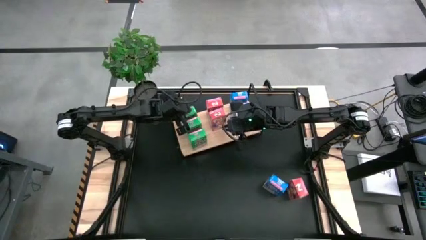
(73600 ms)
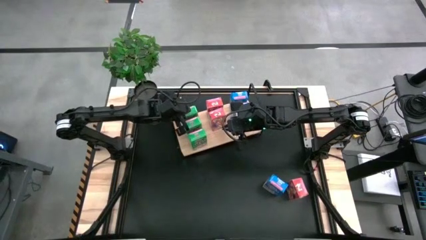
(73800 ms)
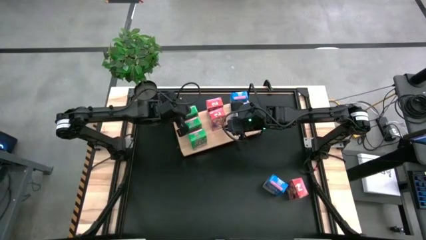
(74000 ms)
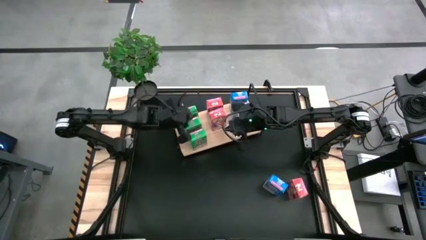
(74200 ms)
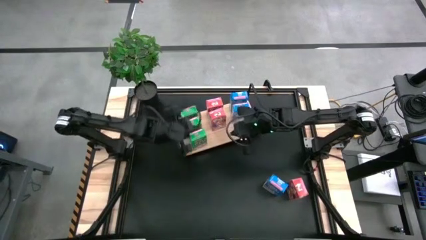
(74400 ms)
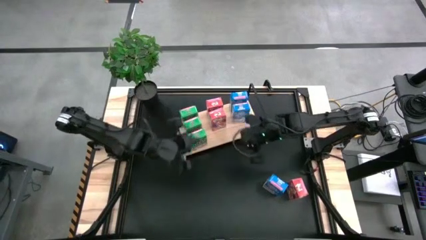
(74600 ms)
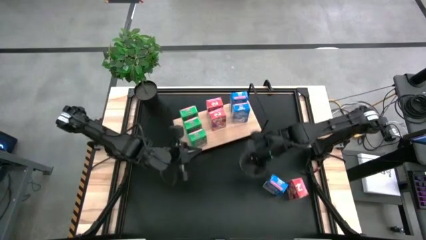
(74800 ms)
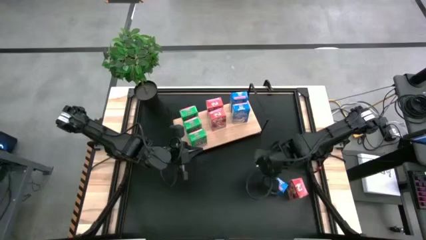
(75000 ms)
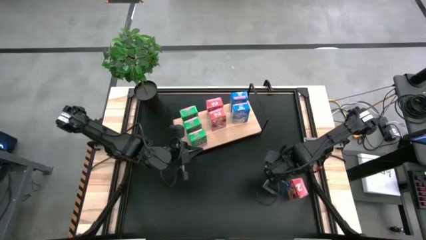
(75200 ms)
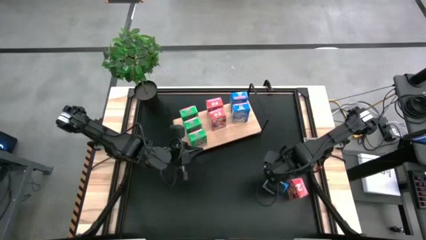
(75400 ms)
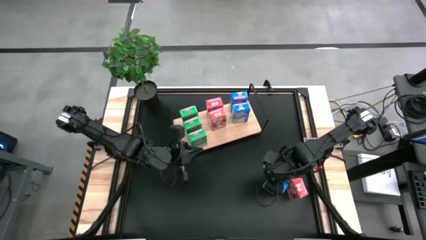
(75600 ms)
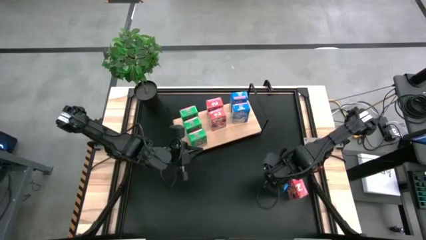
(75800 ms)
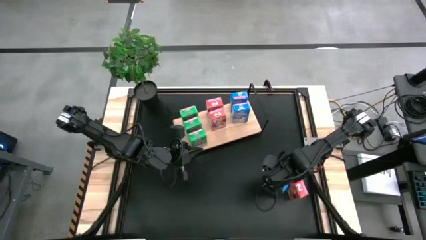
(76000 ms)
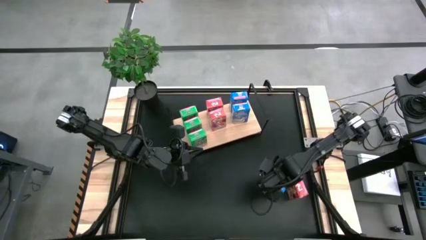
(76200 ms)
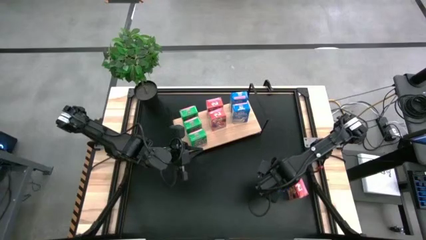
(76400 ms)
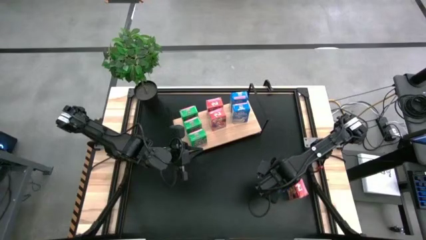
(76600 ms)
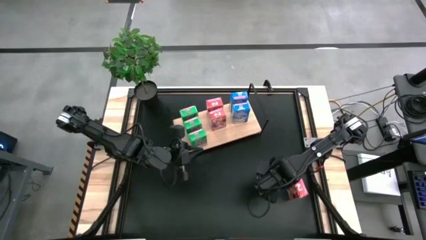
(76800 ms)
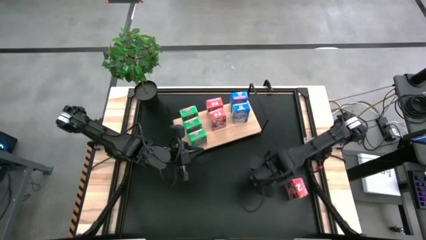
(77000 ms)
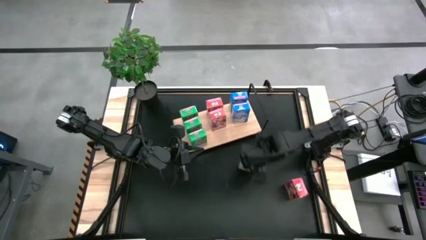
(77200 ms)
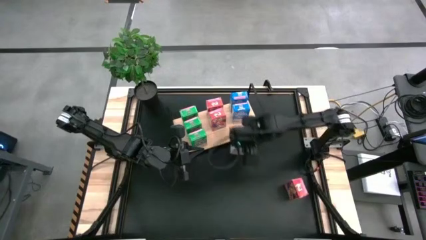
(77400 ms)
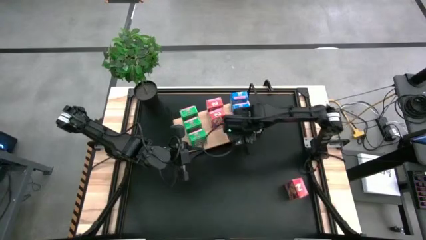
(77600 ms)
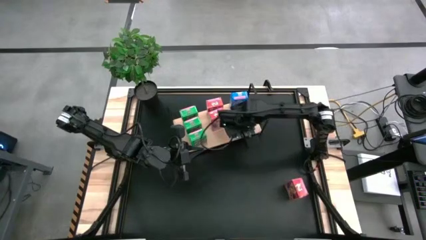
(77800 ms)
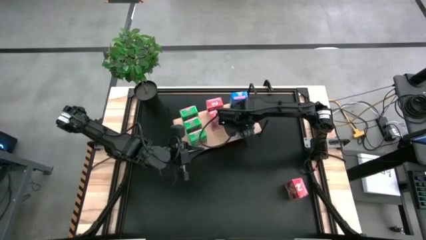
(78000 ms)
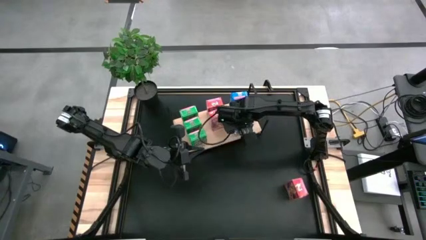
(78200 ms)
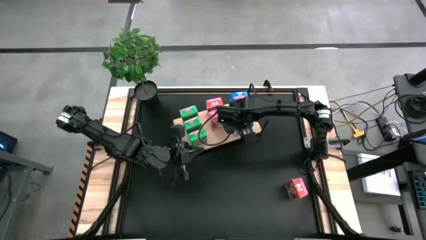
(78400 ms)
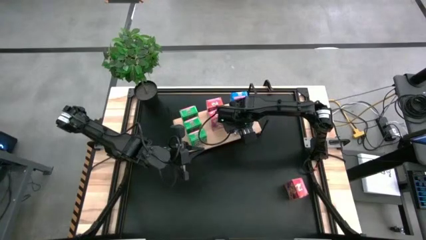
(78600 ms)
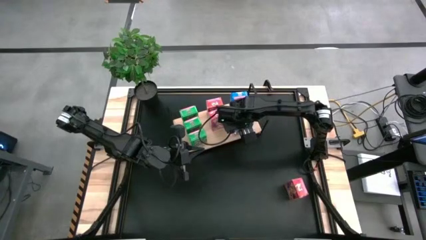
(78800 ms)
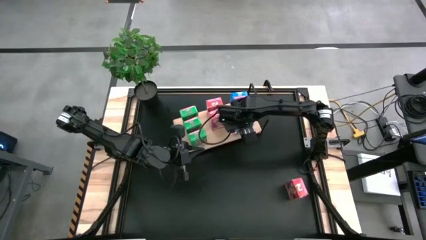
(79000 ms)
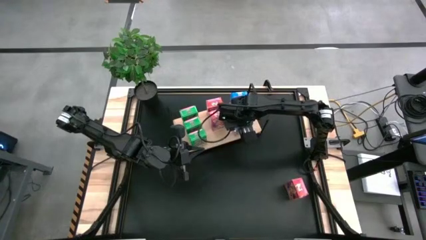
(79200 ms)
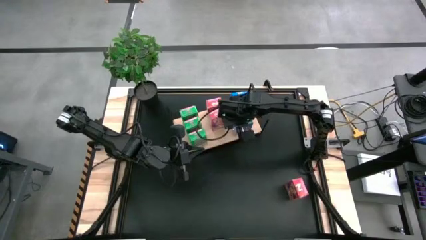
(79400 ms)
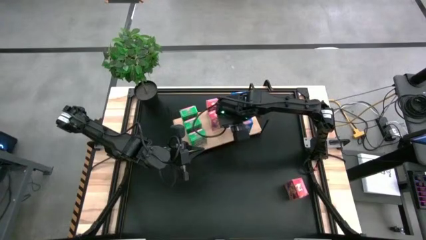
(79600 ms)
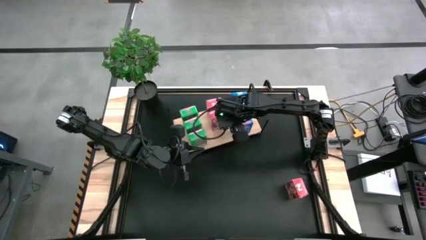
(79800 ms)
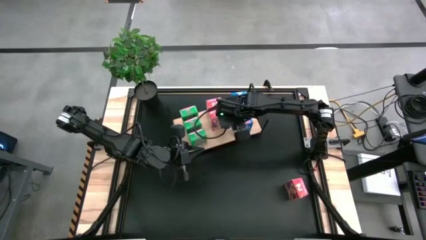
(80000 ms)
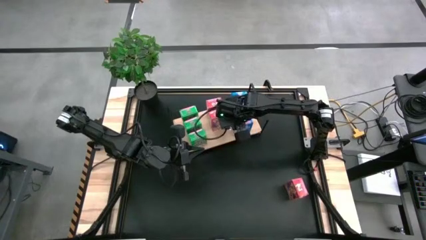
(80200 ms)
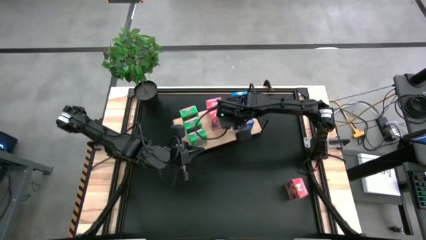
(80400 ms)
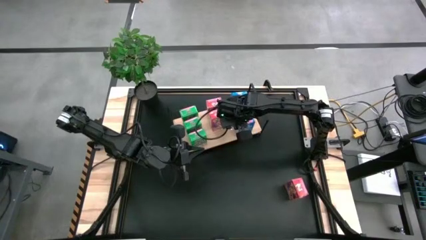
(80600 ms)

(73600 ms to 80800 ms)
Task: Stack cereal on shelf
Align the blue cereal box with the other blue cereal box on the shelf

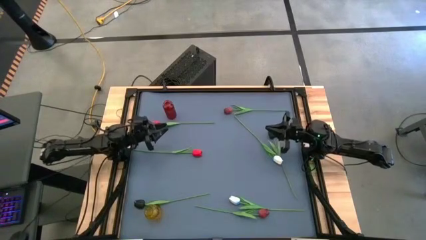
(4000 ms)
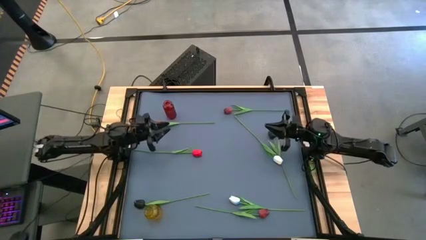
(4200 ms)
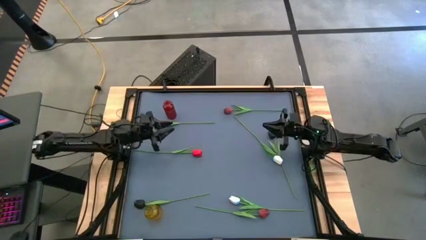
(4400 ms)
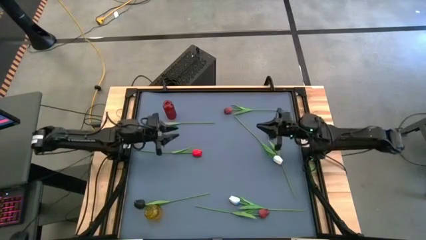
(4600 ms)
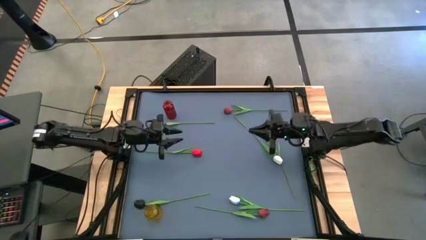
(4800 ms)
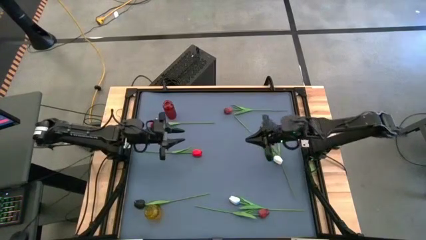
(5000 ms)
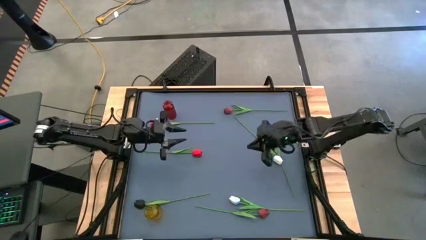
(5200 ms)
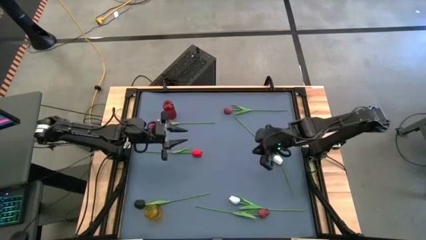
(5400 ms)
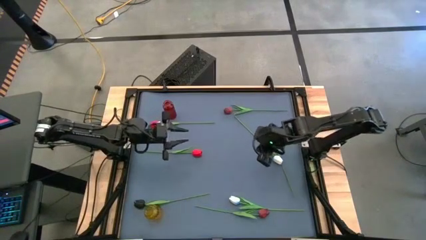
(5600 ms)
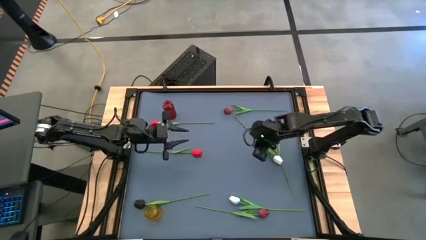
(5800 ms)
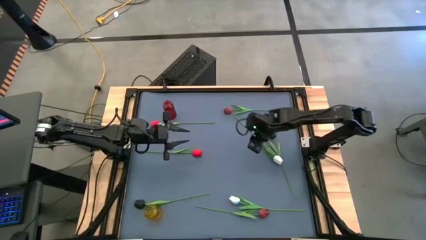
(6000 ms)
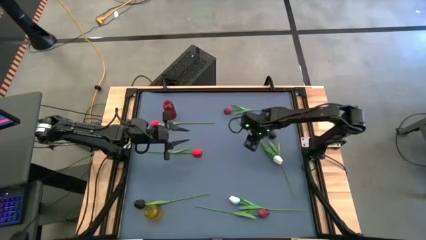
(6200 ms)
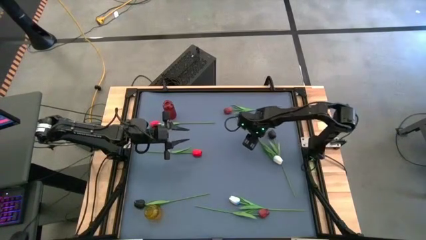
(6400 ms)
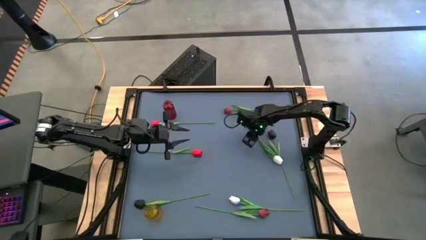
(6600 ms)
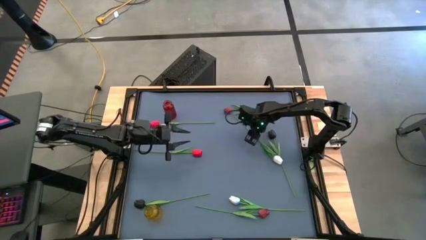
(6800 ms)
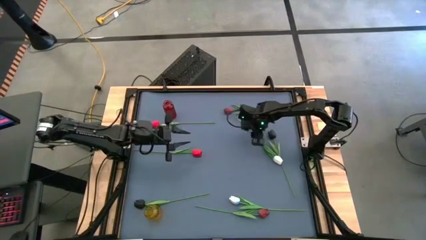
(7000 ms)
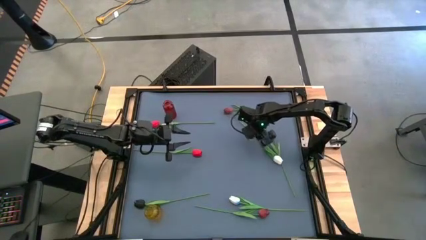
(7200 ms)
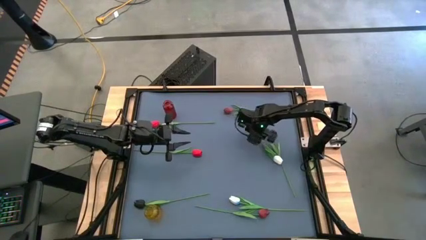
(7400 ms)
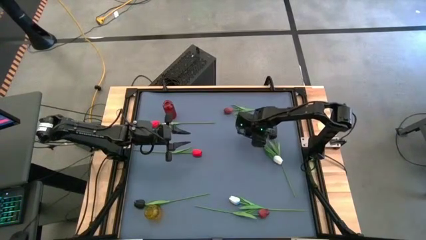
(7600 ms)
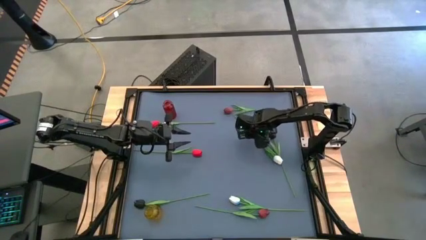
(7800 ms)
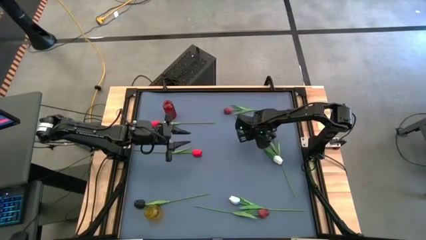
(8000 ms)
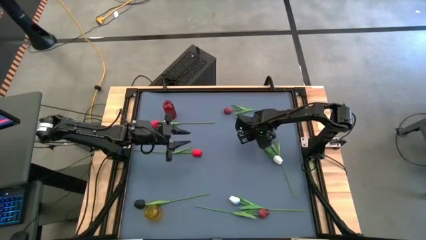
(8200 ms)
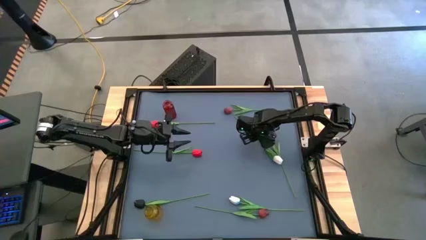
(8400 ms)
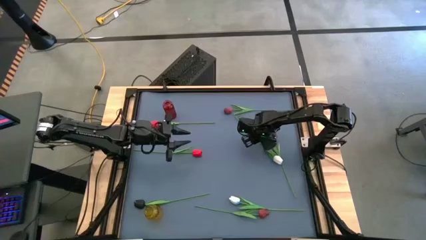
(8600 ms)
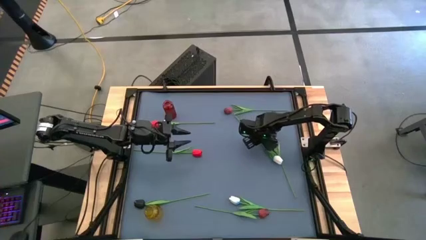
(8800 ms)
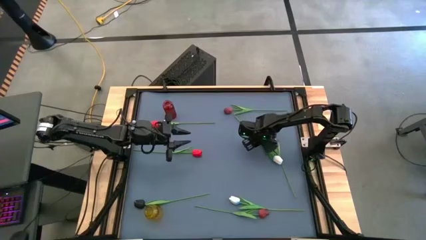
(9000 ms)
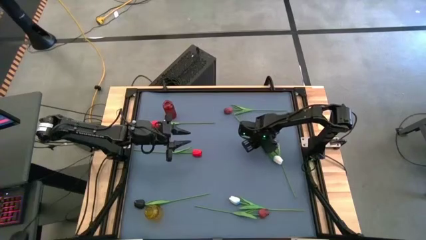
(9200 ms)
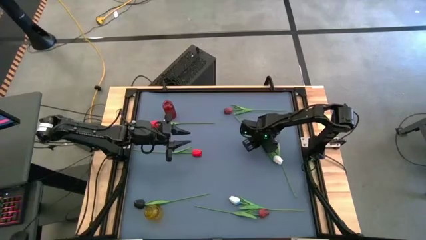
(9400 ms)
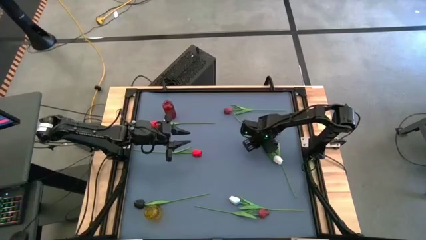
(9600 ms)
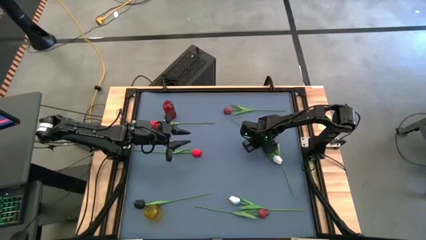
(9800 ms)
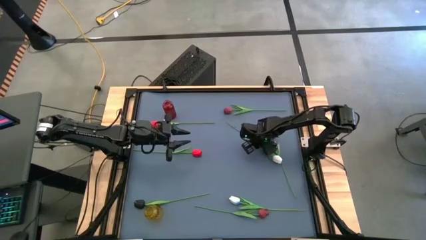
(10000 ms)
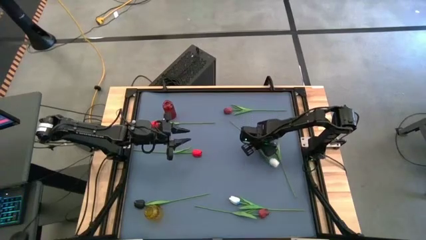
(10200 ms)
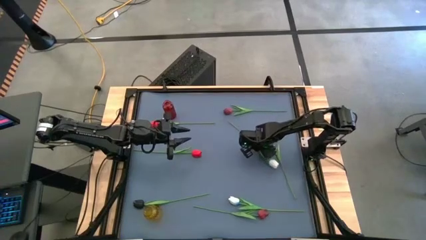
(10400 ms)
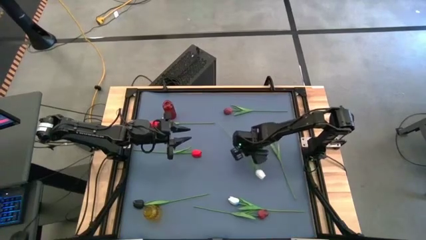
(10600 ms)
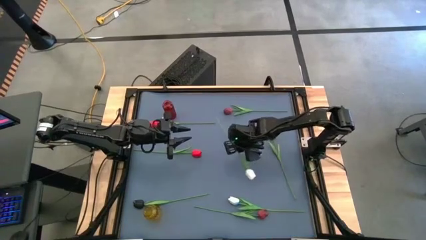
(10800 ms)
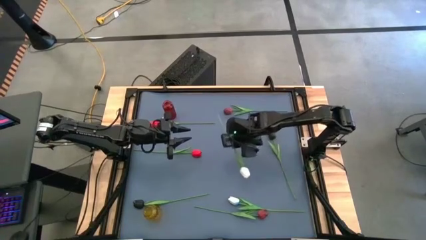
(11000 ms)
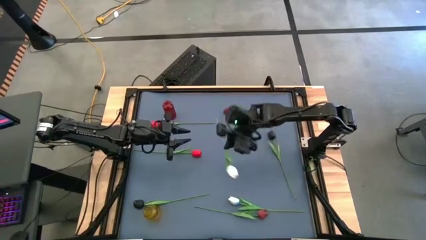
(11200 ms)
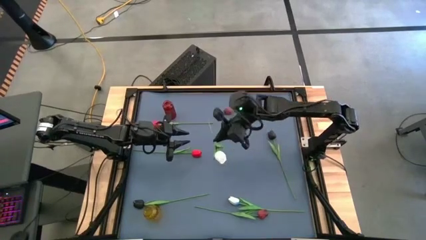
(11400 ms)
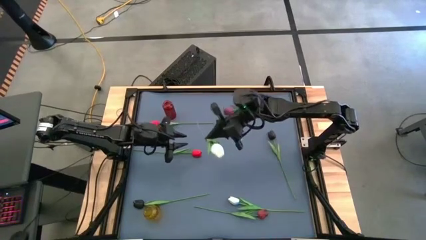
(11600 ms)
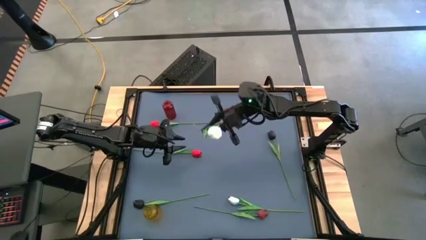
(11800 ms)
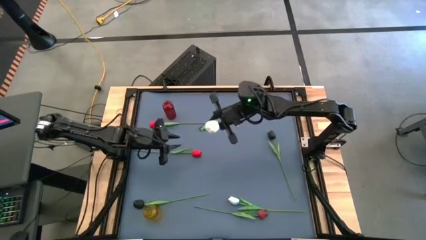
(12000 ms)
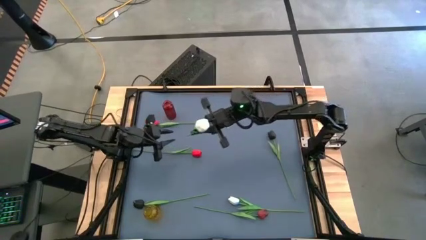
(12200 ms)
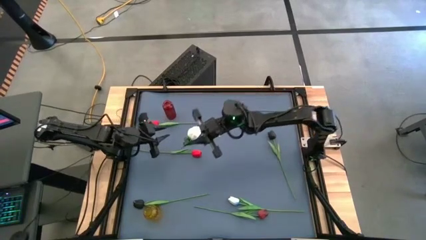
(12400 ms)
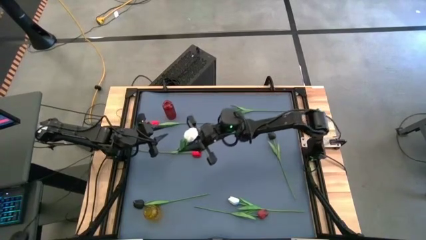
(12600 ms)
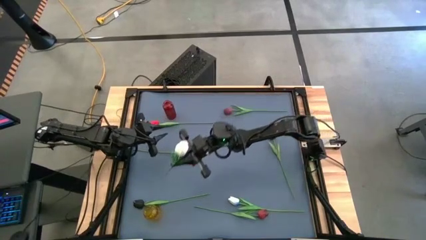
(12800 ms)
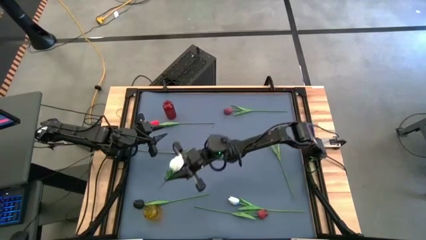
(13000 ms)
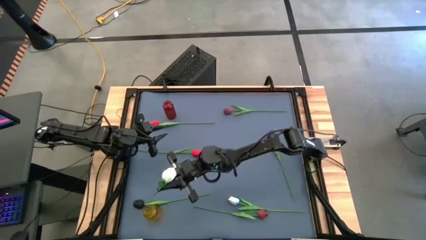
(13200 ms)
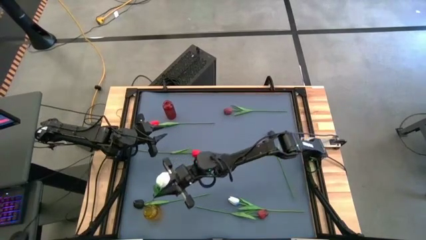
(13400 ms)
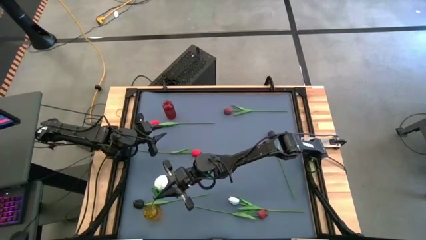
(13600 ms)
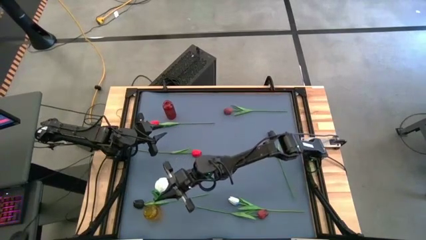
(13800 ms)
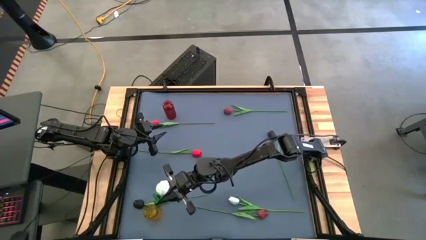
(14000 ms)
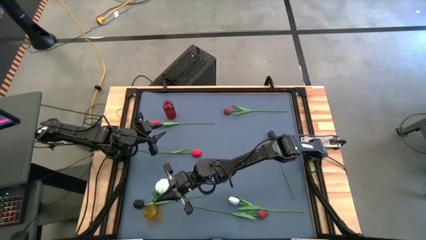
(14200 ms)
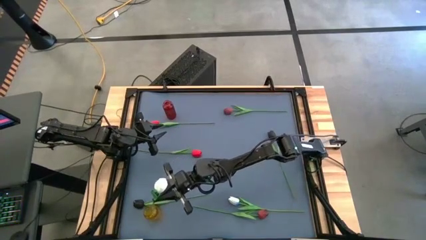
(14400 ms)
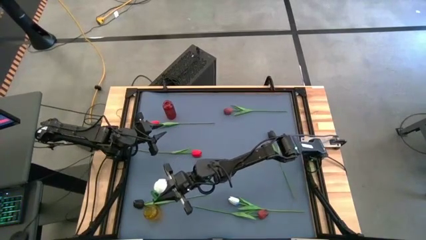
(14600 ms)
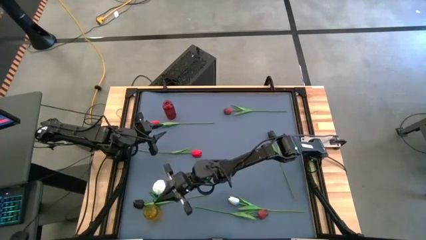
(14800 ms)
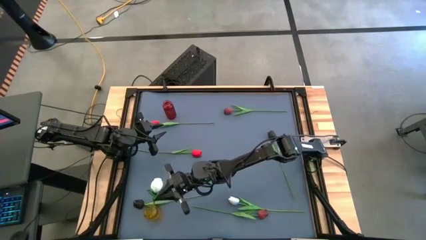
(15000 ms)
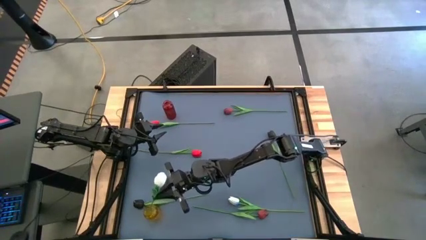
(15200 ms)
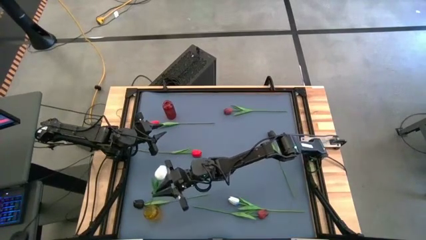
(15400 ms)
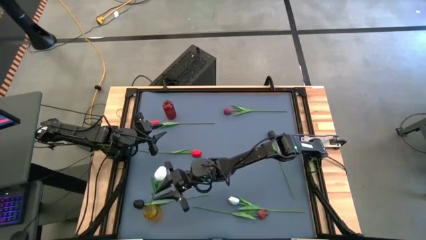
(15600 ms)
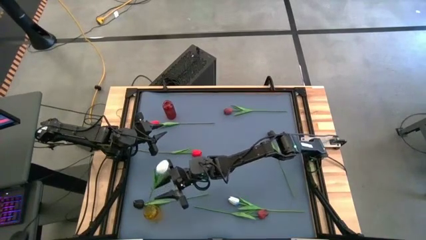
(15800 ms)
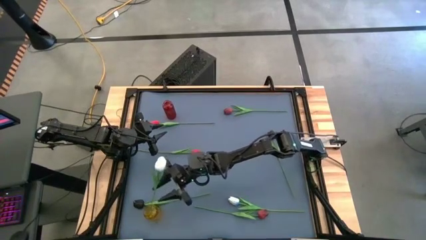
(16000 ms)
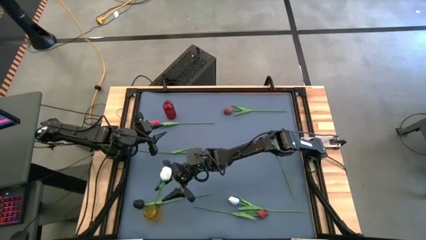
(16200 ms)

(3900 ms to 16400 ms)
Task: Sort flowers into vase by color
Put the top white tulip into the yellow vase
